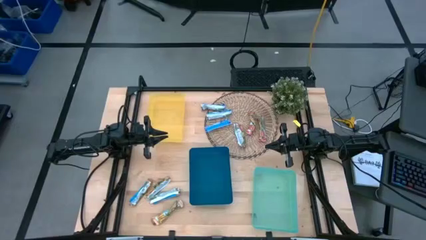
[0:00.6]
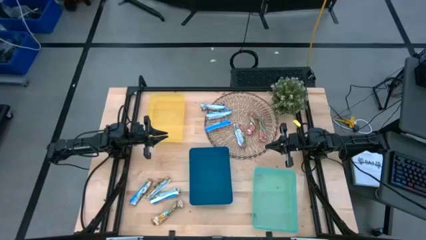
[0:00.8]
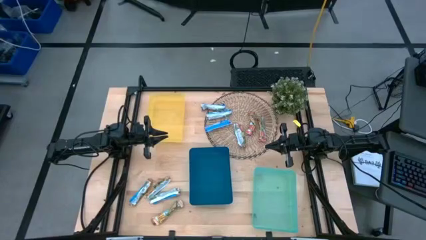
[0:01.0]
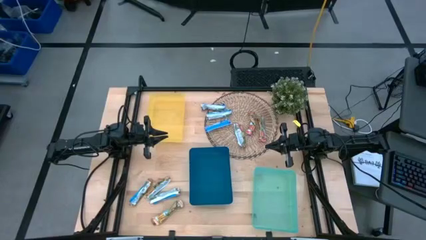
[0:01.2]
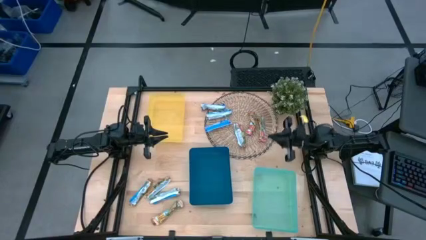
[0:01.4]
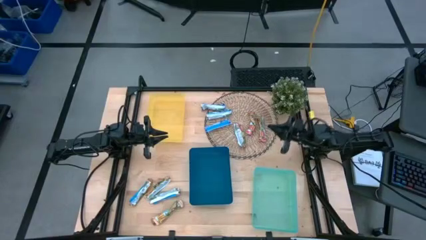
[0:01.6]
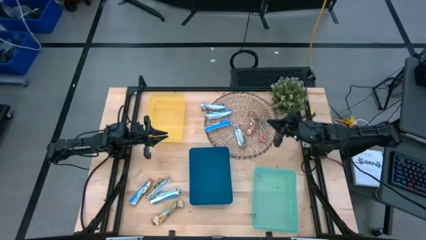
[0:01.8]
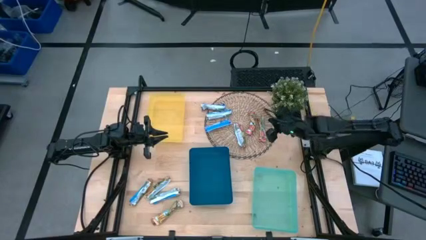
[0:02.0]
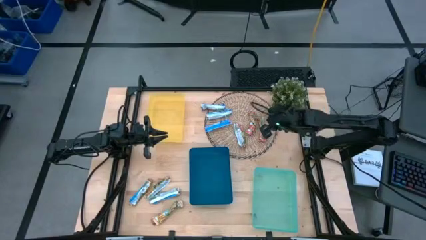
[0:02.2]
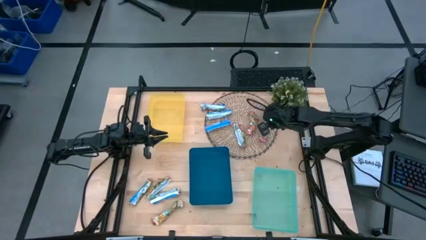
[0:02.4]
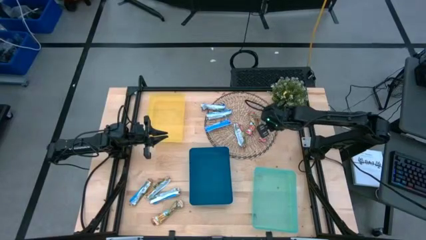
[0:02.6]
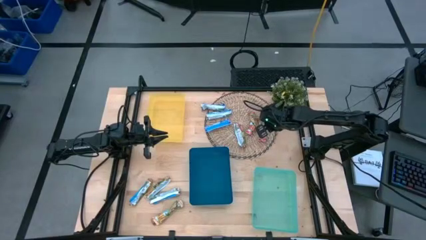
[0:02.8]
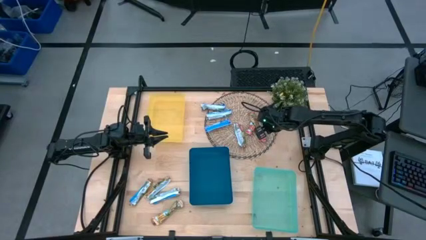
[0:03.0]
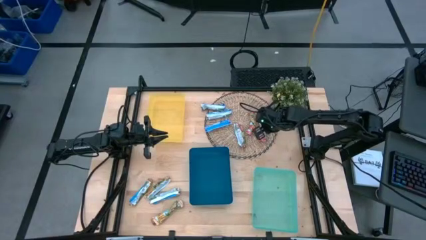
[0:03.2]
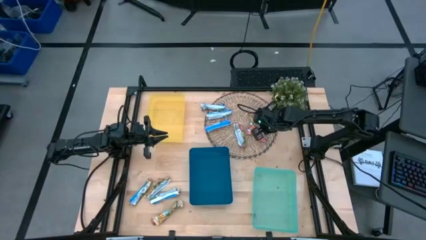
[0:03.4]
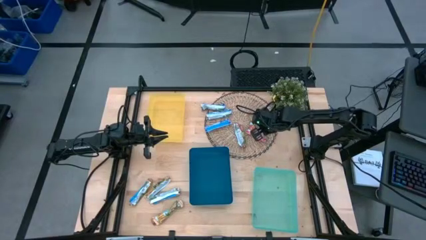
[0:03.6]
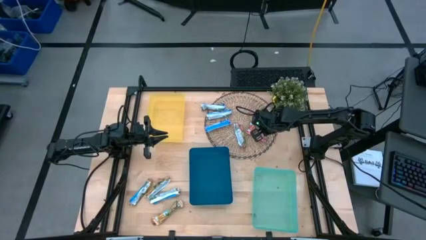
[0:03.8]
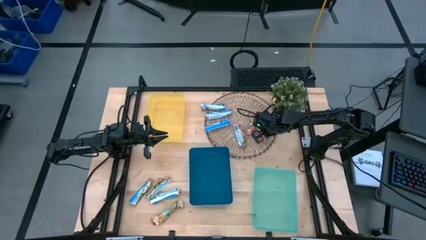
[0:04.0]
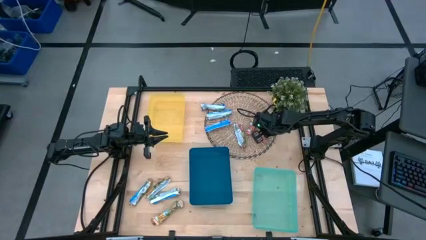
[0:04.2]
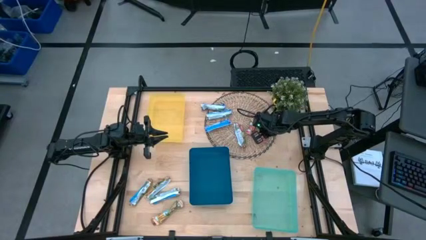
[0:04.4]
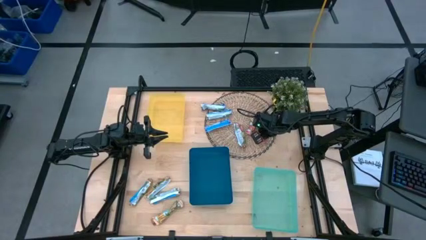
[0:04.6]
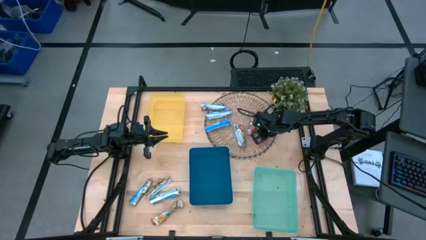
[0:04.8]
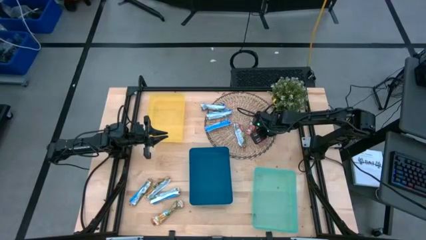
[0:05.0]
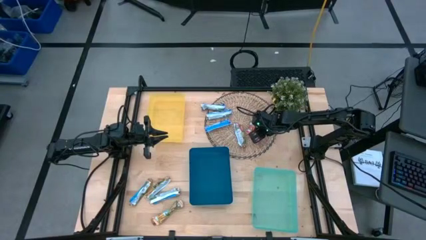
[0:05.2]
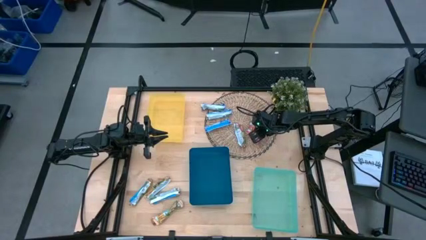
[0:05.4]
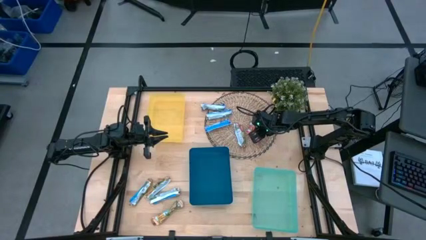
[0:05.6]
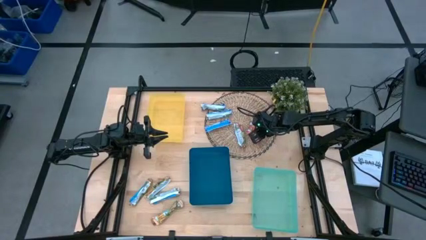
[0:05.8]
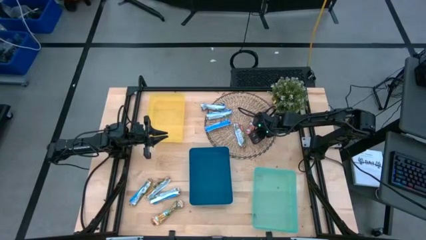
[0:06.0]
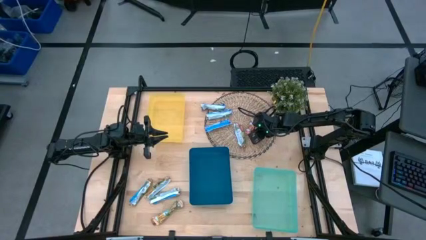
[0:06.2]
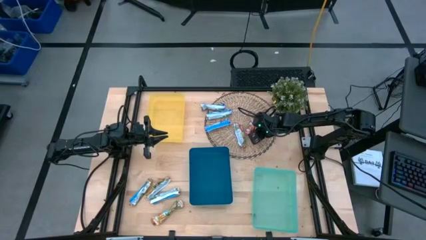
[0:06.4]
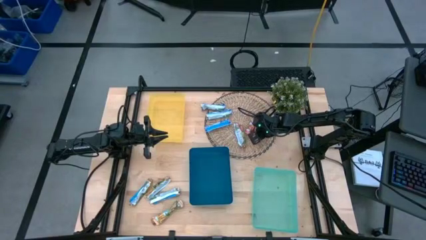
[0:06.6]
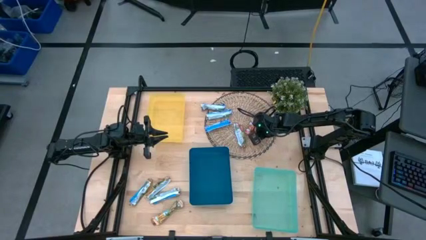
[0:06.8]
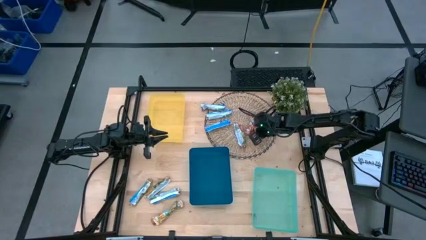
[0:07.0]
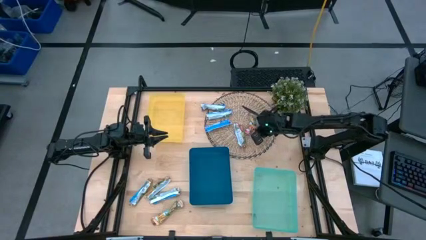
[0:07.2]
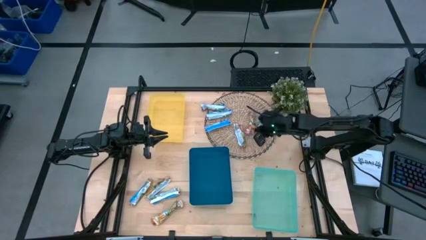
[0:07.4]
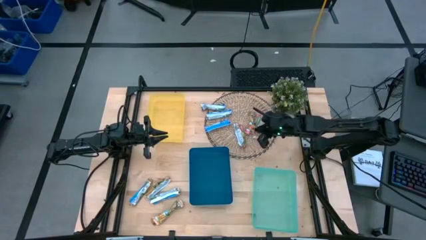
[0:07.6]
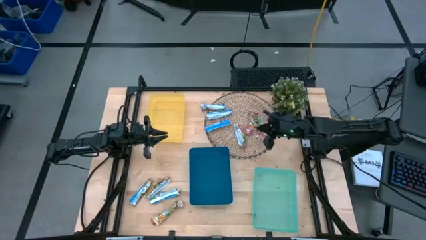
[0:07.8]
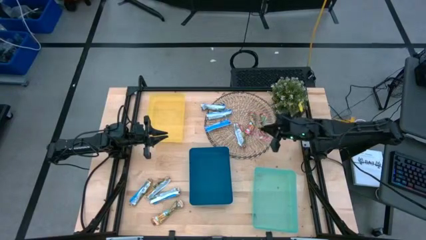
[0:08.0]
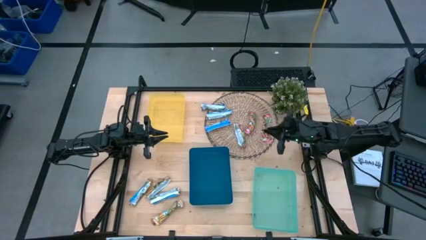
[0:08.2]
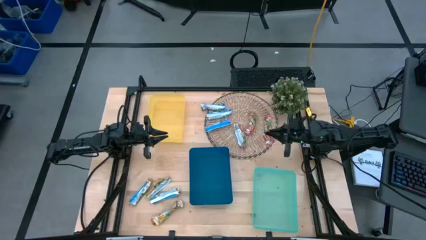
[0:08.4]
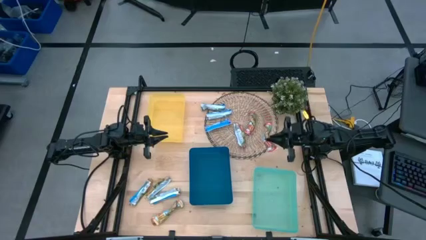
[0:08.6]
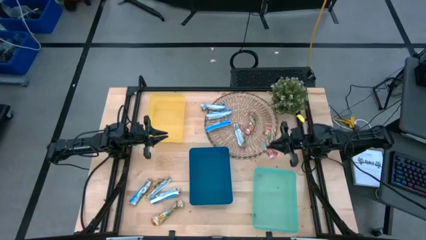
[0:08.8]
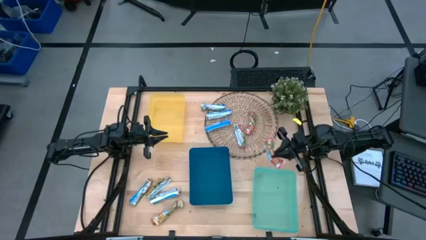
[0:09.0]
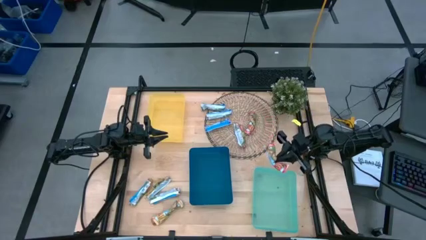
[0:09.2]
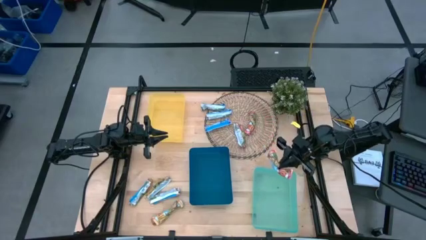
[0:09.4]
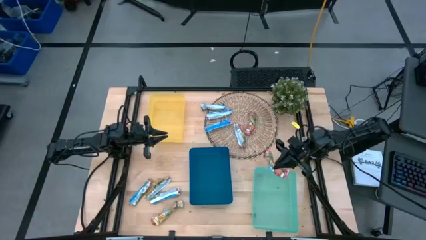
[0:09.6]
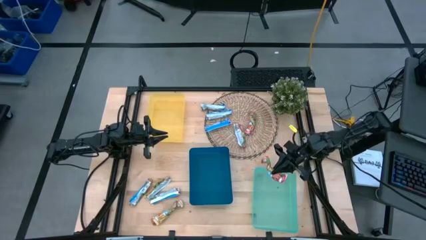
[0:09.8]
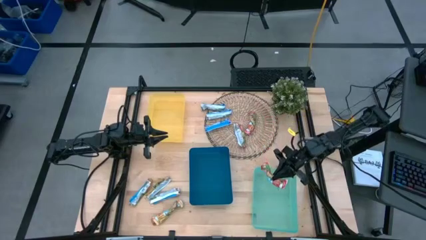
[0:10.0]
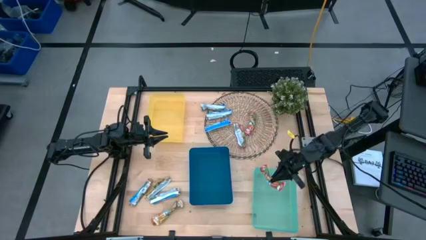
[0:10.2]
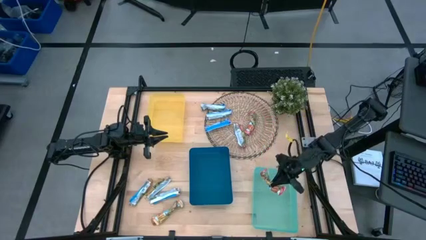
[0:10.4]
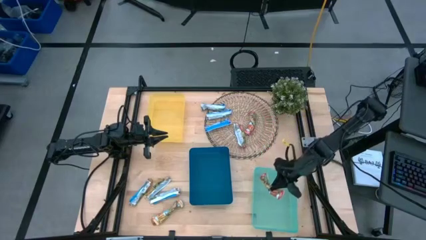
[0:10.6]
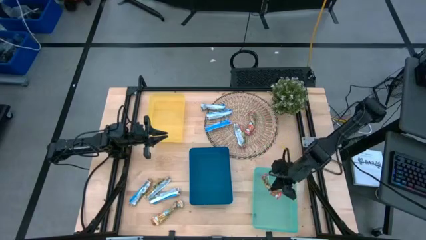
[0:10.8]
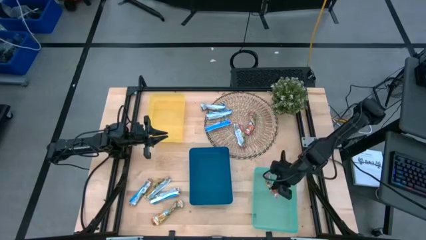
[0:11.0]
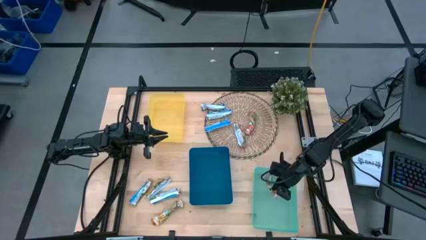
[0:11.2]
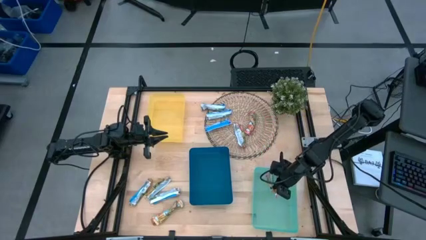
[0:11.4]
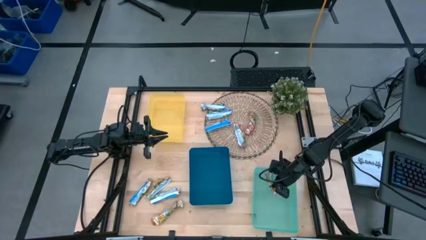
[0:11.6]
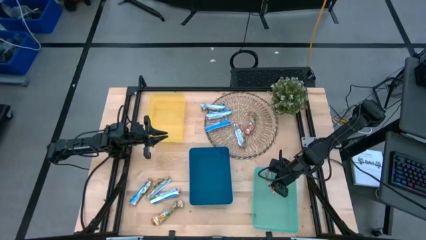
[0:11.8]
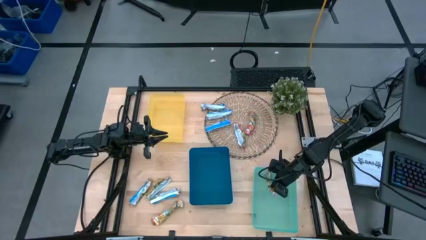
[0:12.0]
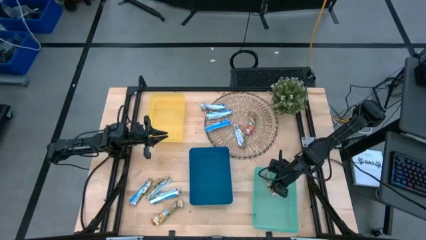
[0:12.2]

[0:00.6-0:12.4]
Task: Pick and place Granola Bars by type
Put the red granola bar into the green bin

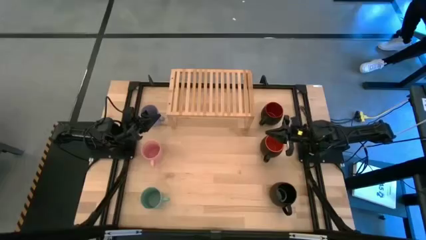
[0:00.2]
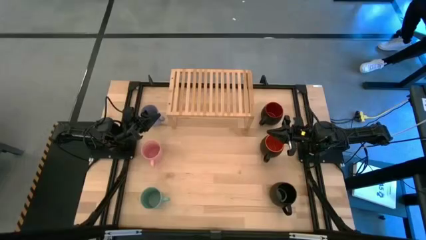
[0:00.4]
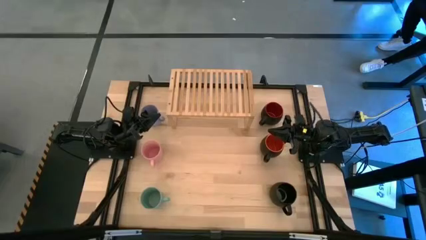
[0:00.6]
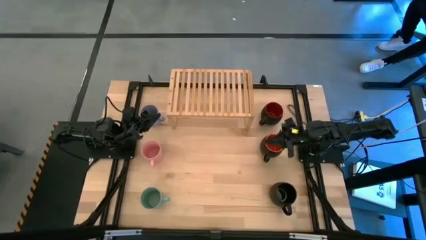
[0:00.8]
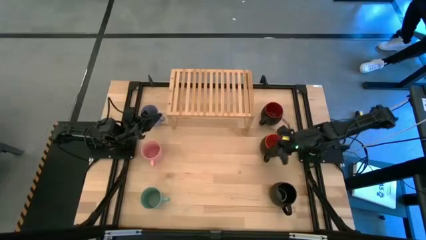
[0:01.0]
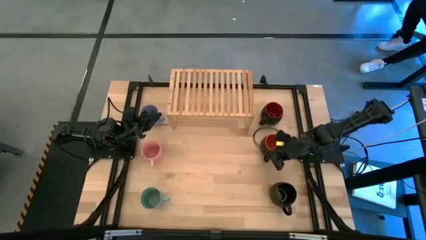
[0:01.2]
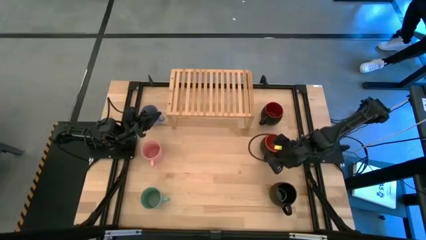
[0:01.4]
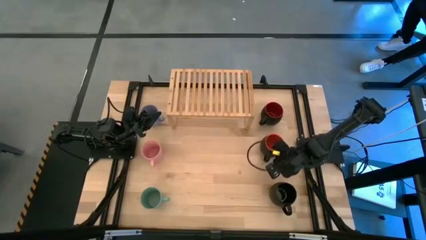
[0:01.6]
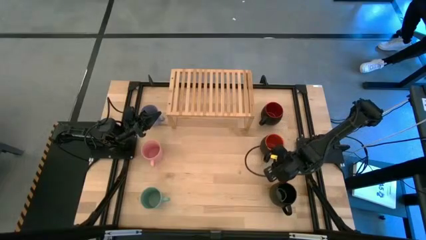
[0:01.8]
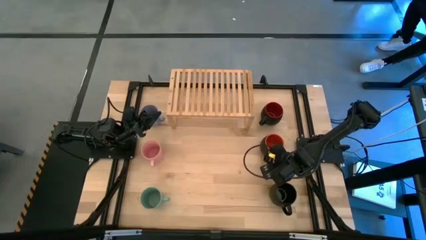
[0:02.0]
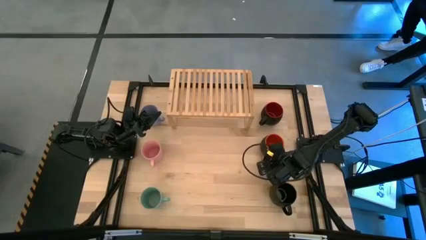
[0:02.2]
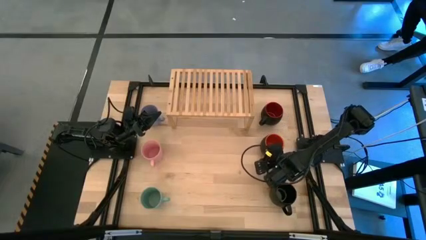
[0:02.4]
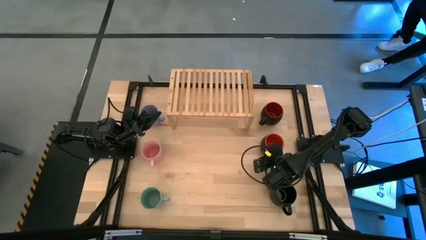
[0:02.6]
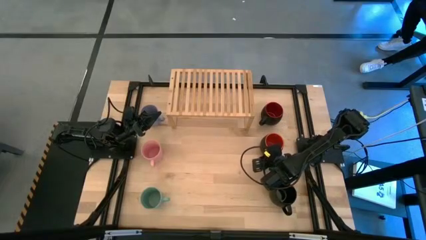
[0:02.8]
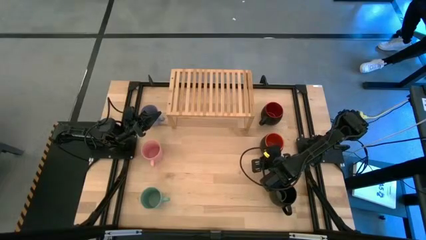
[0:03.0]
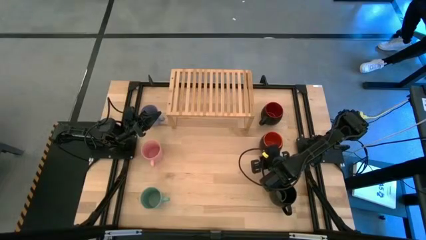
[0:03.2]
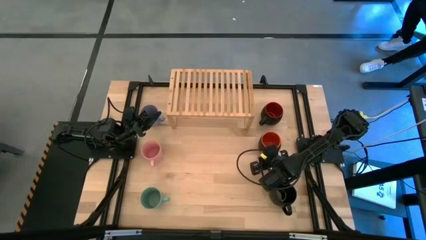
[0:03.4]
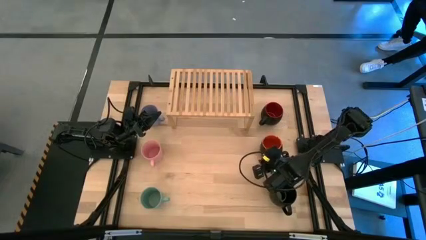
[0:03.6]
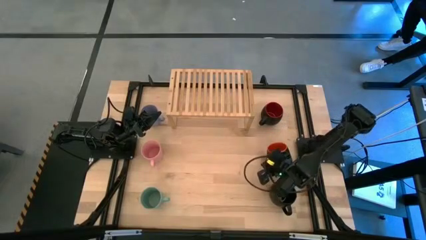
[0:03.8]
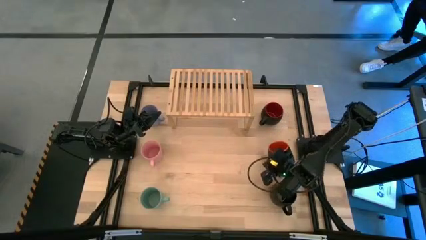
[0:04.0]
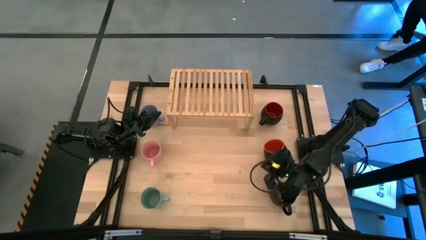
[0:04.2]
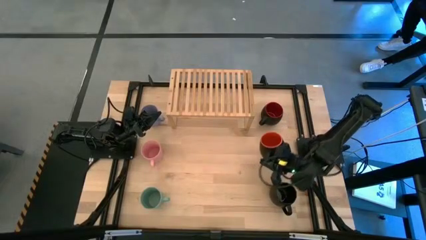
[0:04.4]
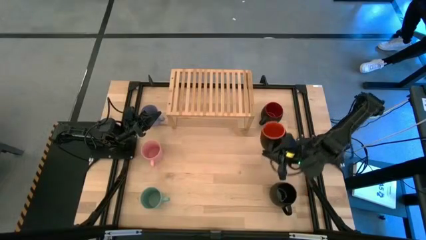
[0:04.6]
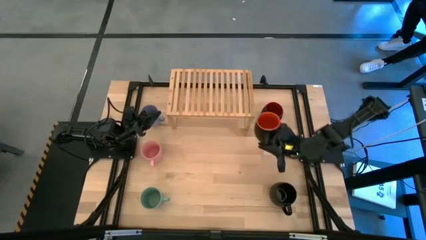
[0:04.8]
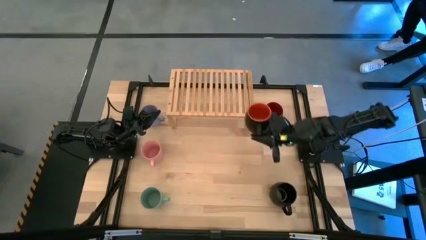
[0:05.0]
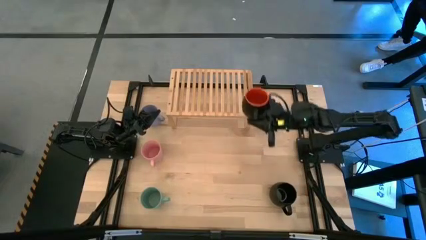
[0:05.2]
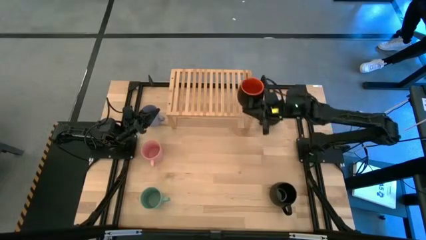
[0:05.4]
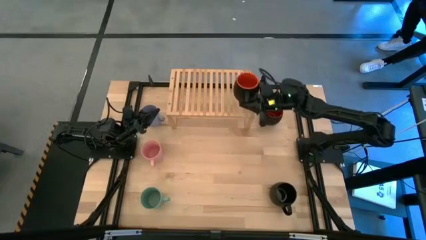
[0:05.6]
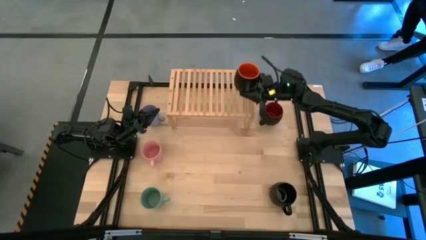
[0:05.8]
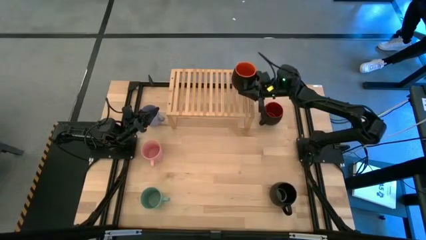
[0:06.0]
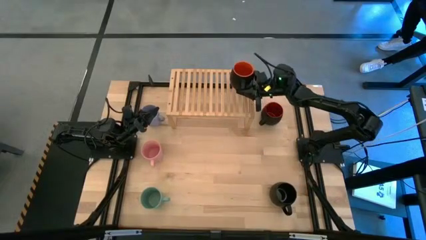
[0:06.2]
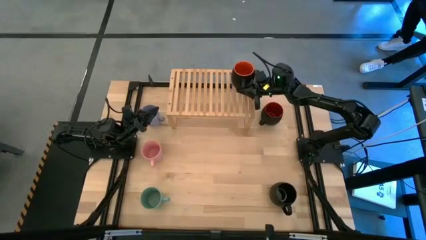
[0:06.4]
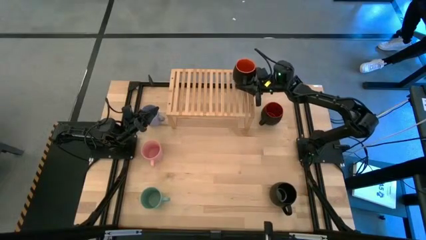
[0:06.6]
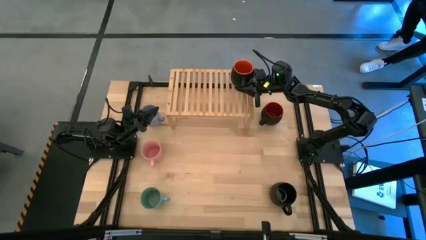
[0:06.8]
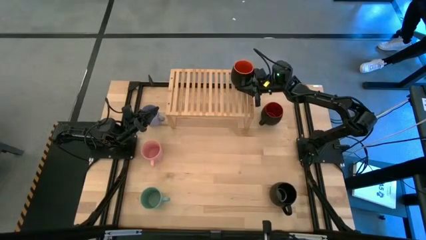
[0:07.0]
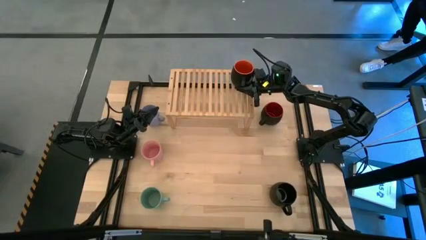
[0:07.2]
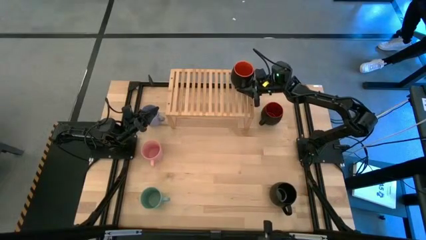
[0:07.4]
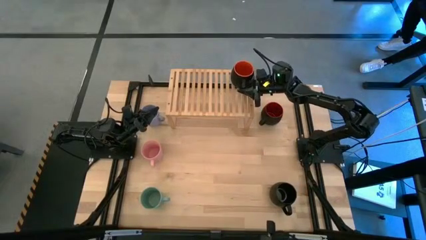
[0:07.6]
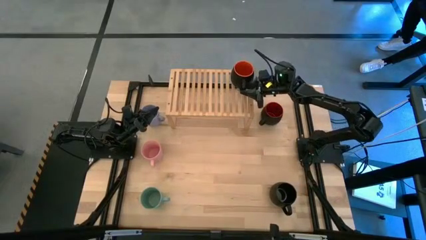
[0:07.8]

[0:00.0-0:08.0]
Task: Place coffee mugs
Put the black orange mugs on the shelf
